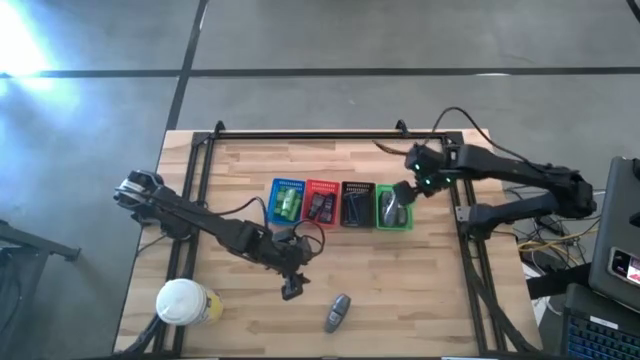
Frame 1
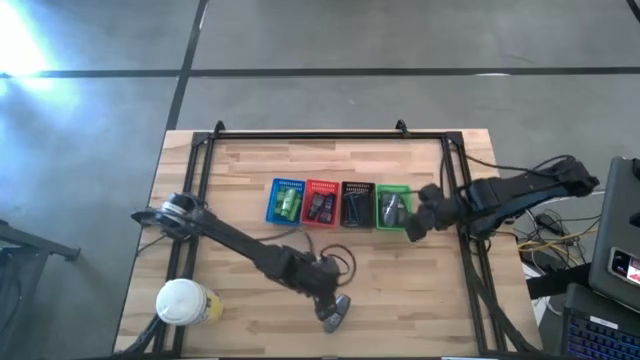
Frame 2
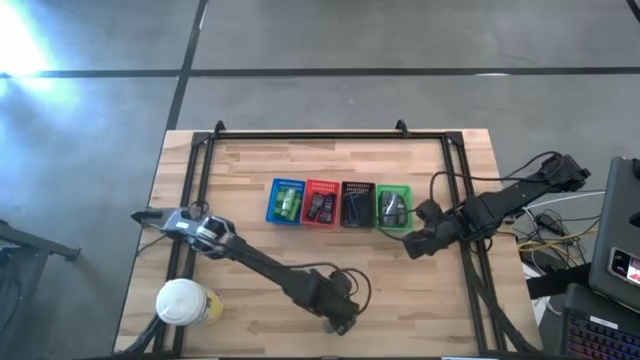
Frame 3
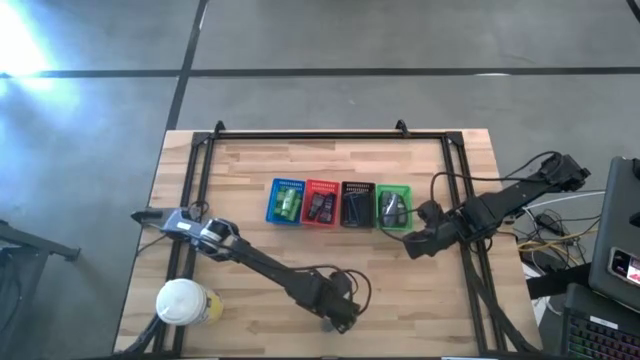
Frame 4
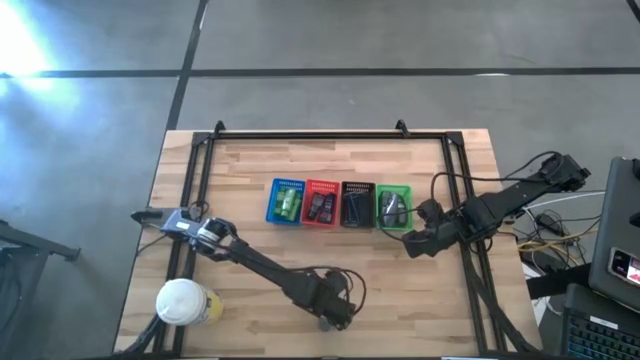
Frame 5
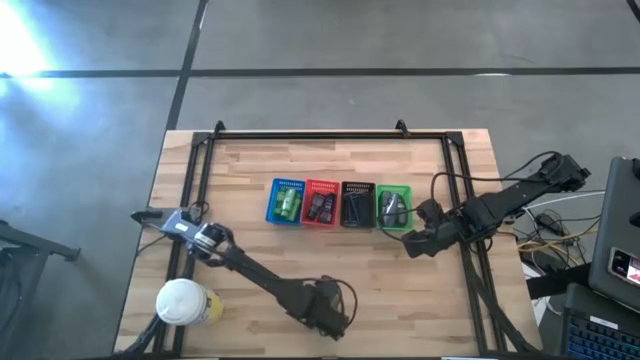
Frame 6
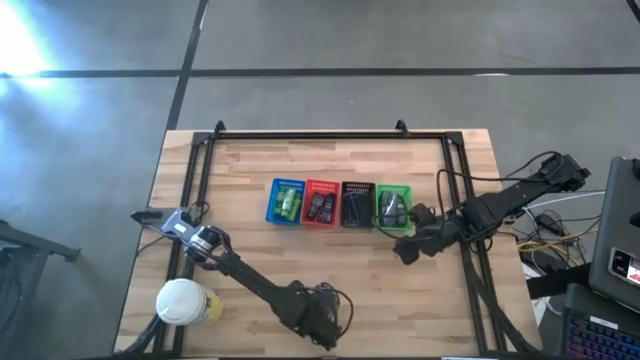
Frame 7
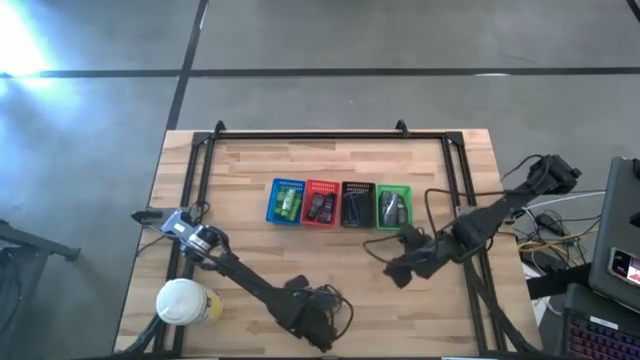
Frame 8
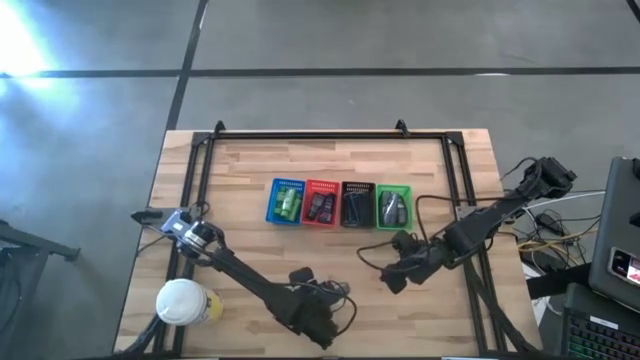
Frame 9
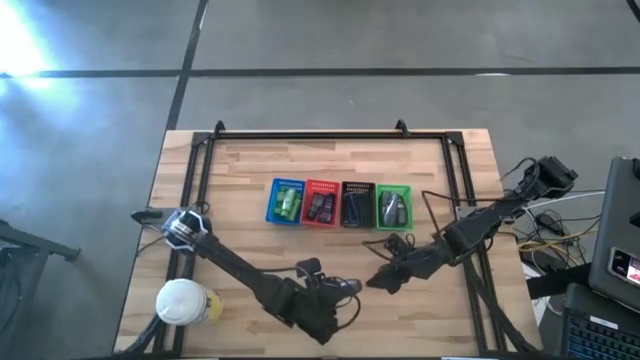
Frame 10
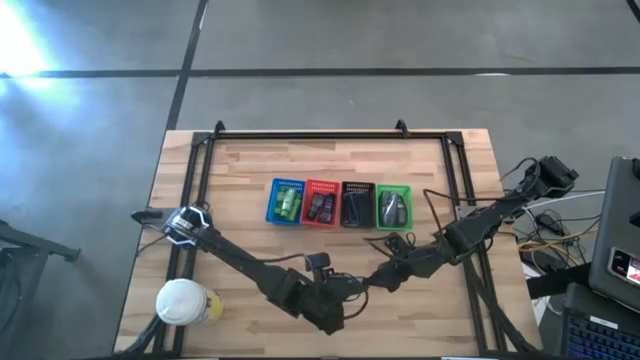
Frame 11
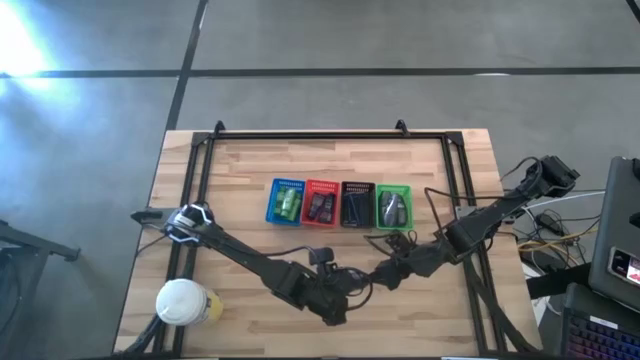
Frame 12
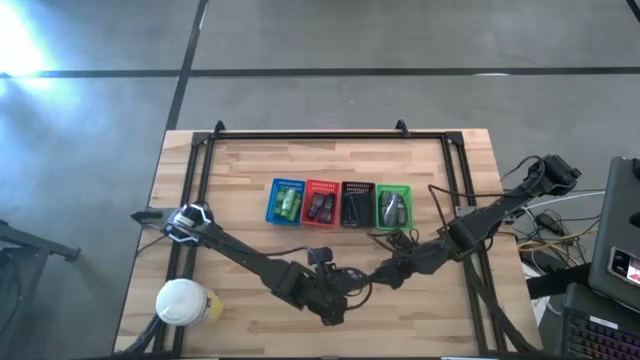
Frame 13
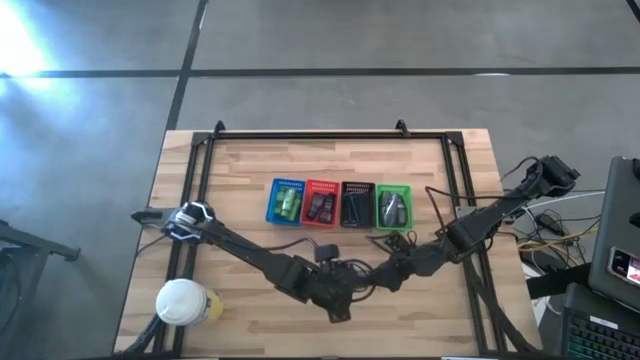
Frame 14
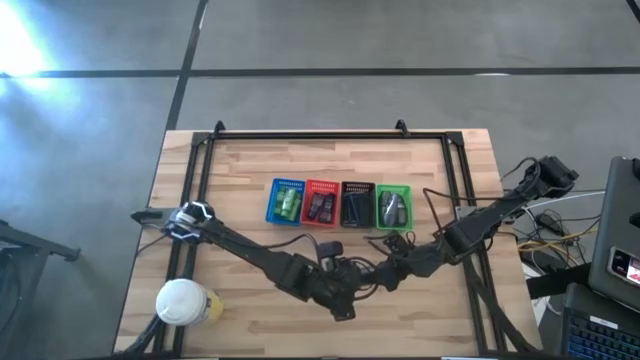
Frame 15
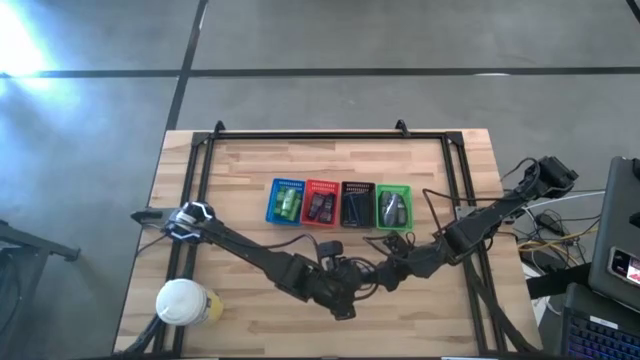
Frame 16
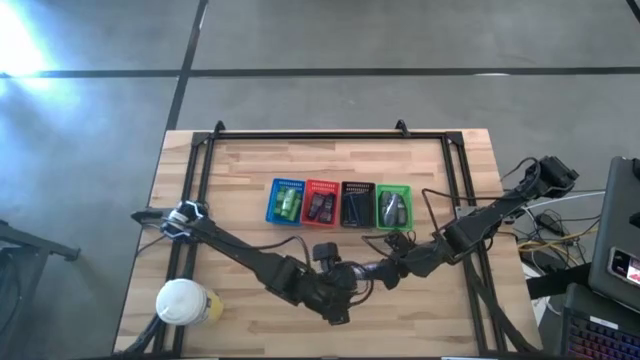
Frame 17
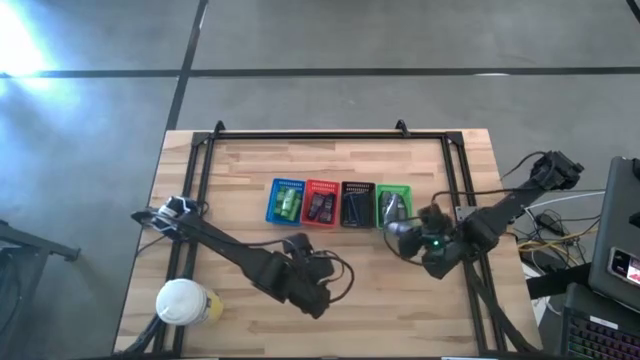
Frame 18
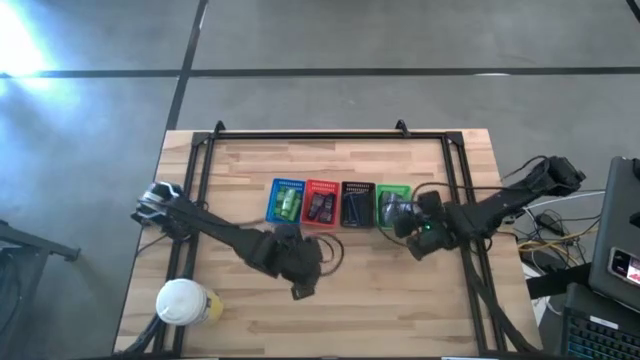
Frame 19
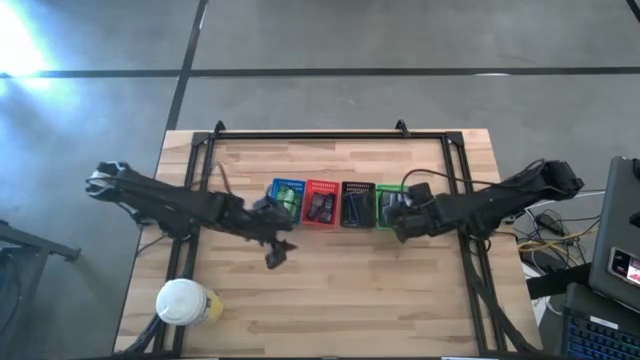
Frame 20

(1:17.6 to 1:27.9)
Task: Pick & Place Travel size toiletries
Put the gray deodorant into the green bin

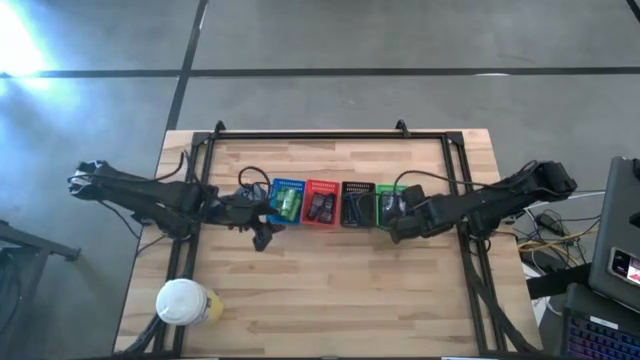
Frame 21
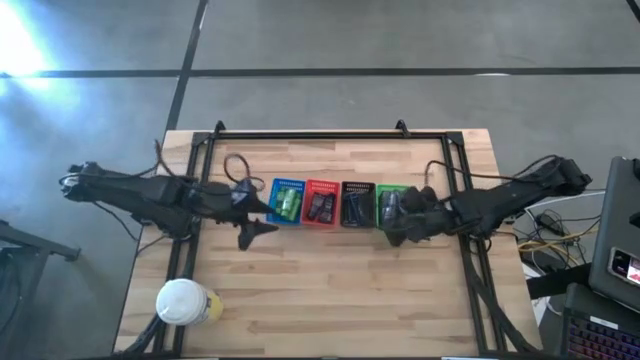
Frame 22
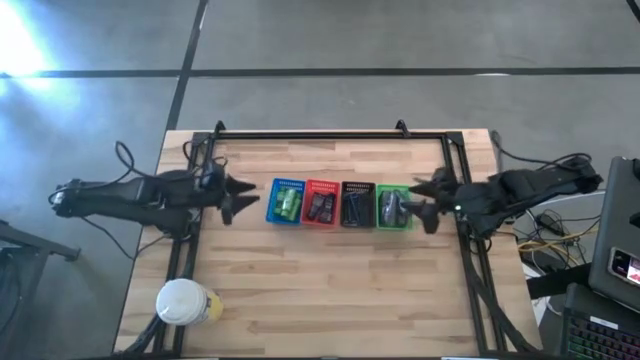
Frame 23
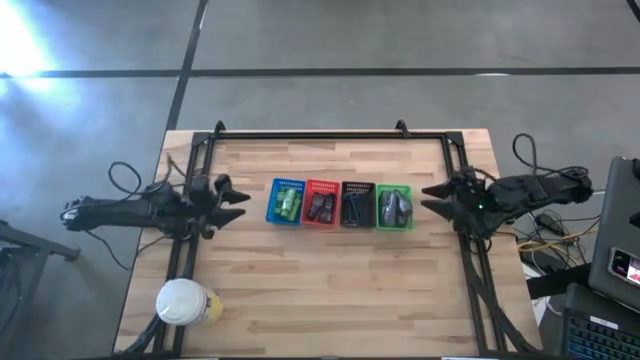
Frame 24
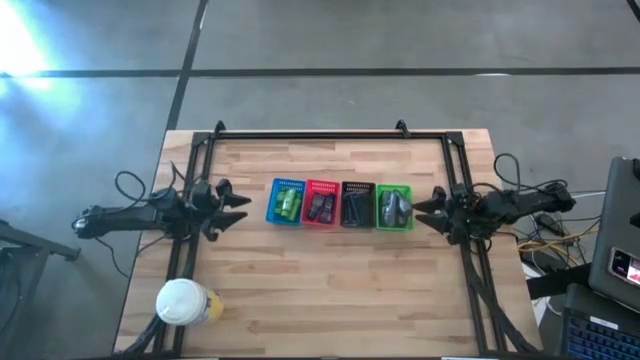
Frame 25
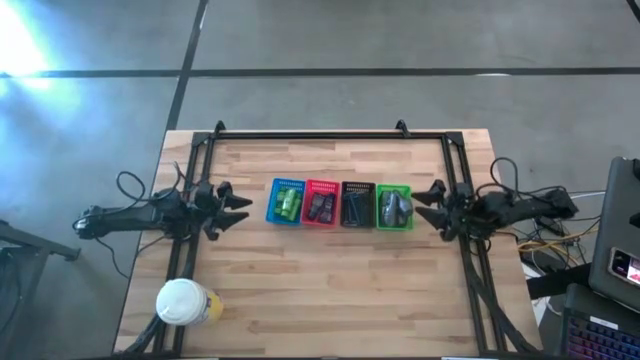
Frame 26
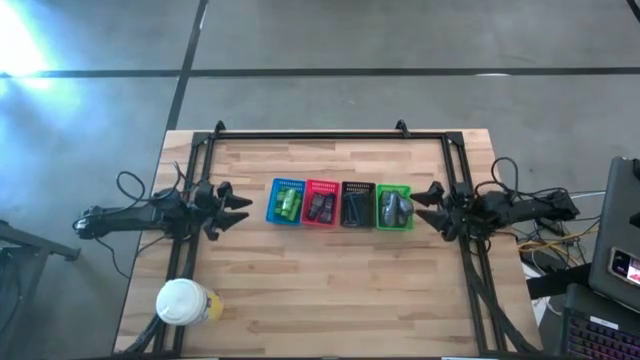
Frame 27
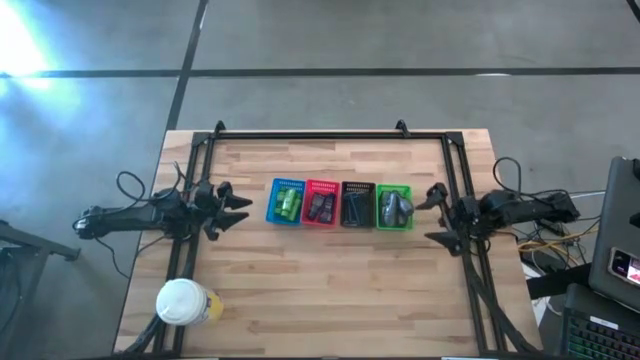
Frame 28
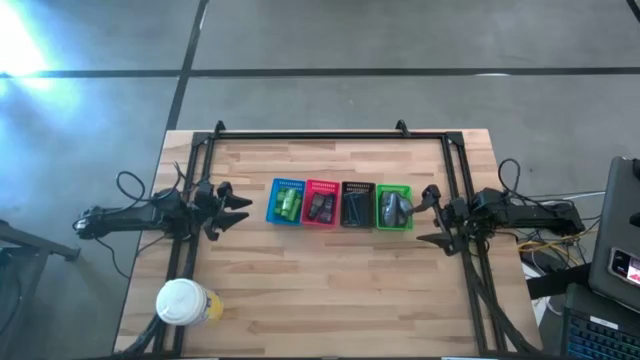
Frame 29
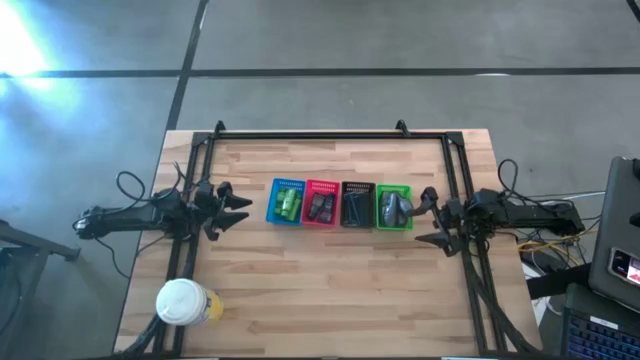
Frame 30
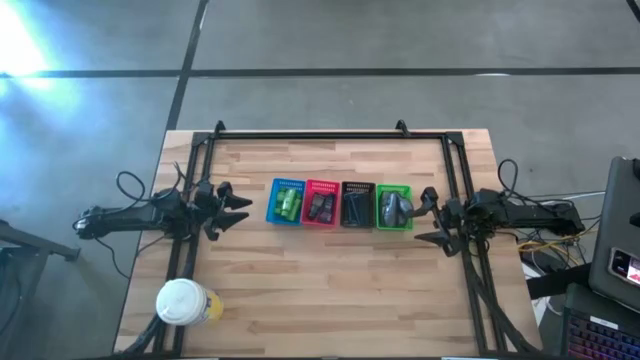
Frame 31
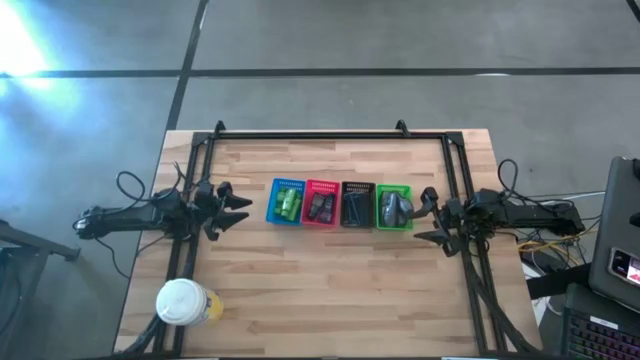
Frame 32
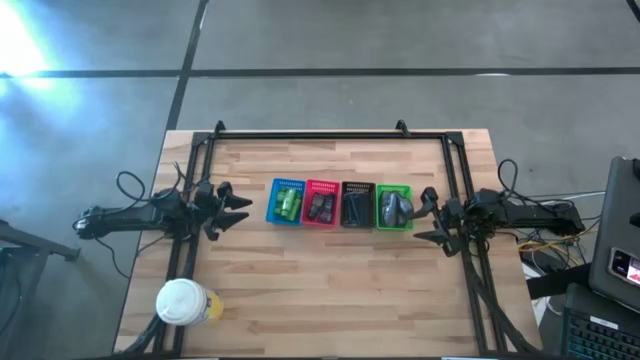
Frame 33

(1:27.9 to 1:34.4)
Return to Home Position

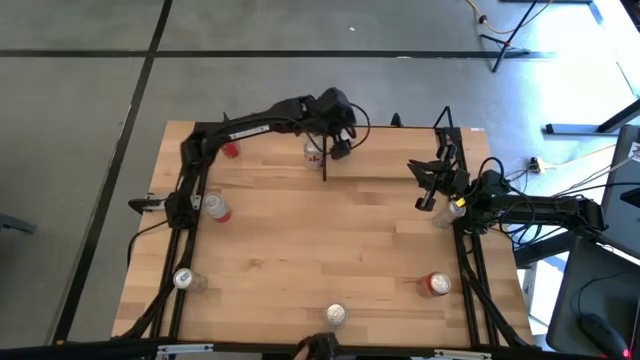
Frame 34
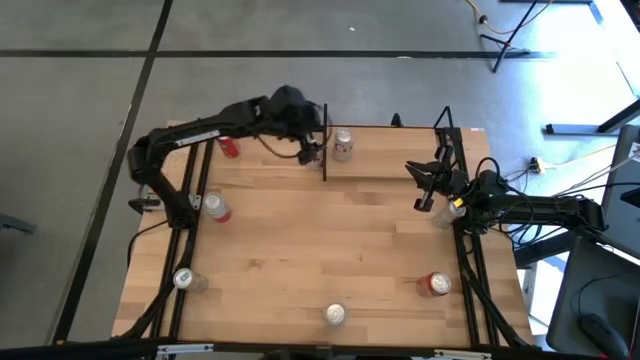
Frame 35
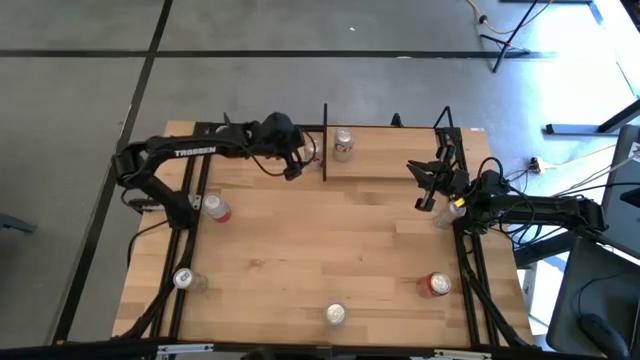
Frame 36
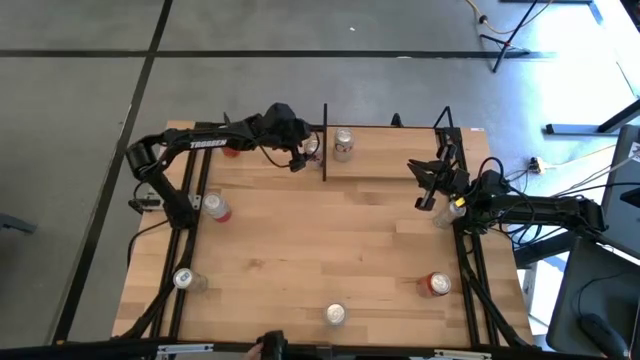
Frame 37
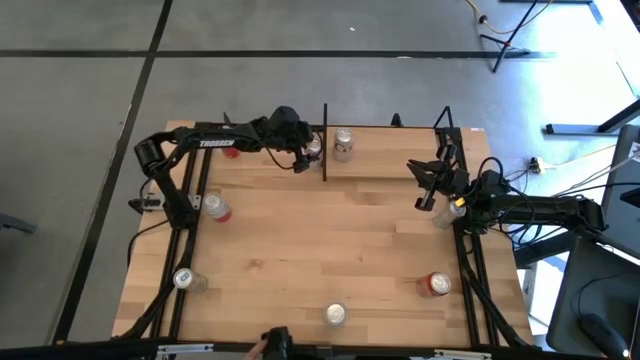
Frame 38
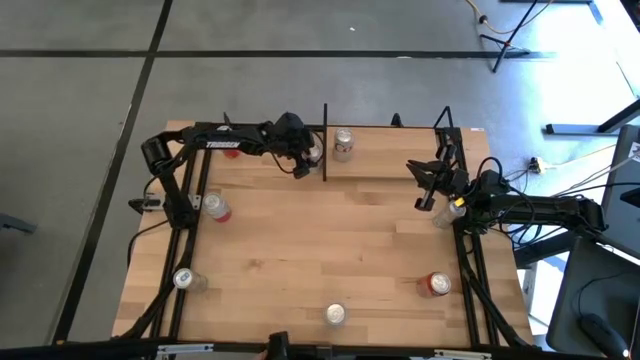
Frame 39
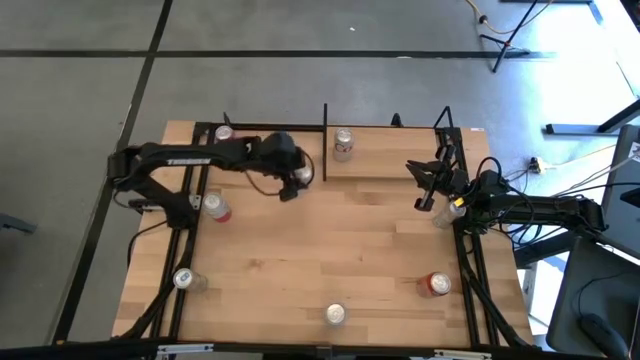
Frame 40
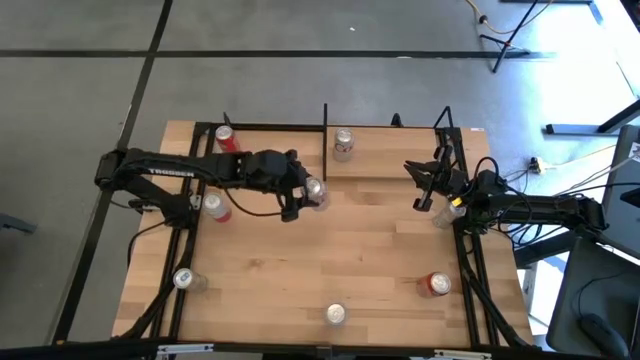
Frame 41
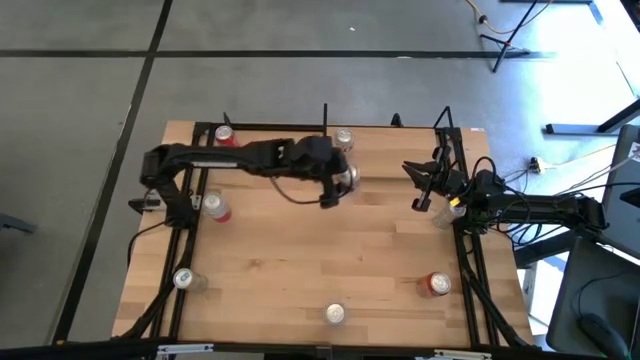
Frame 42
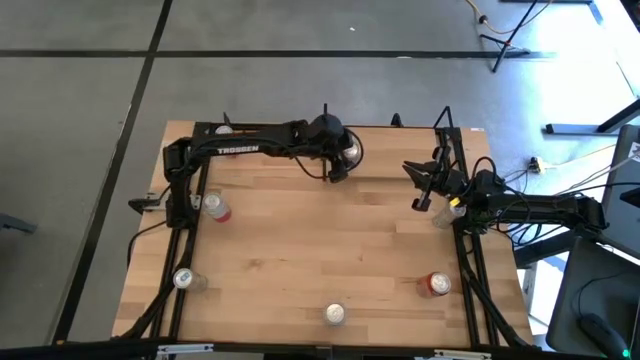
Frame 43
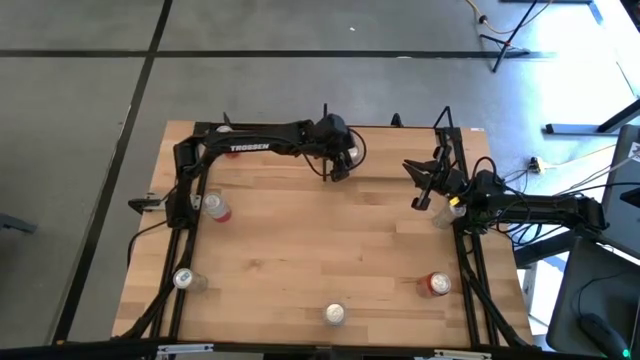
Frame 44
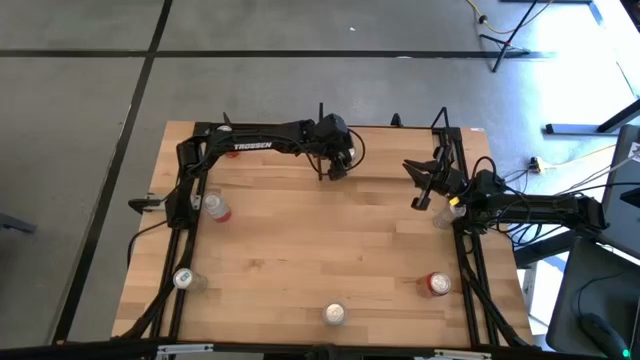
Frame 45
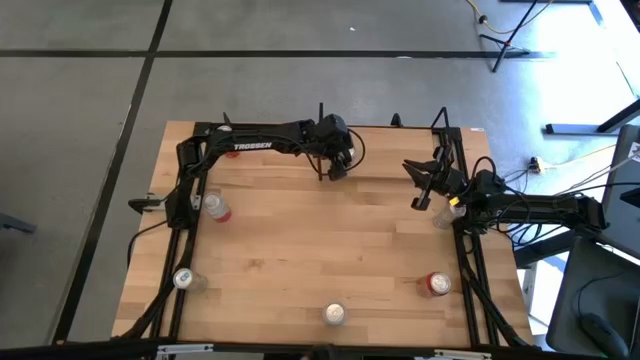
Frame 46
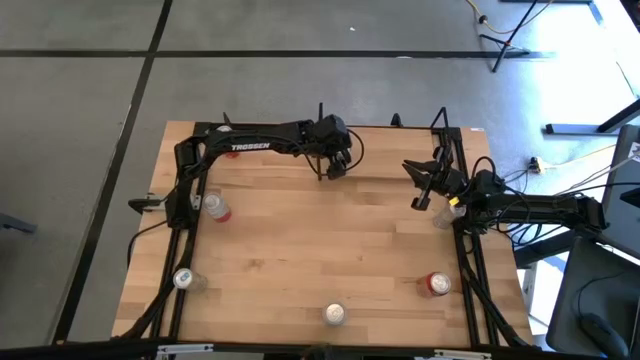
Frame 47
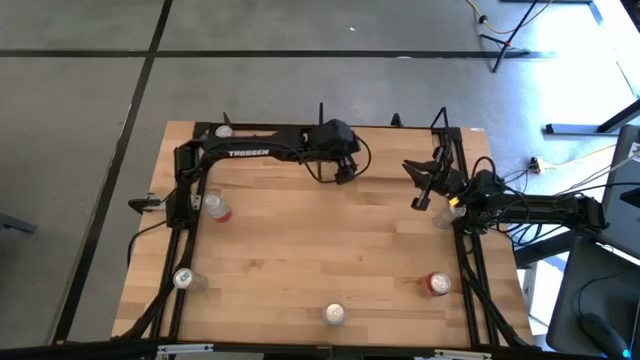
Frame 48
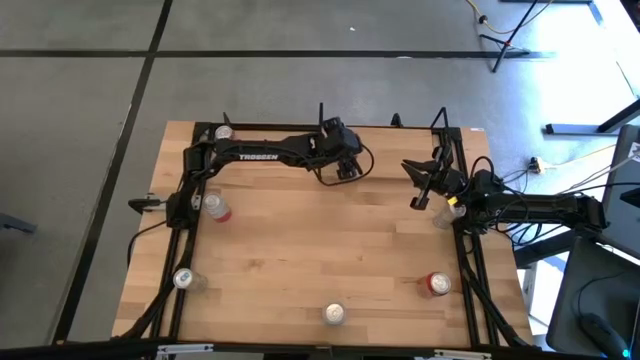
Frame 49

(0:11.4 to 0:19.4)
Task: Place canned beverage on shelf
Put the red silver soda can on the shelf aligned with the other red silver soda can
